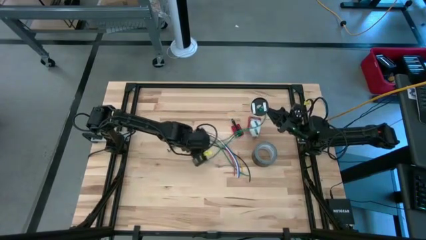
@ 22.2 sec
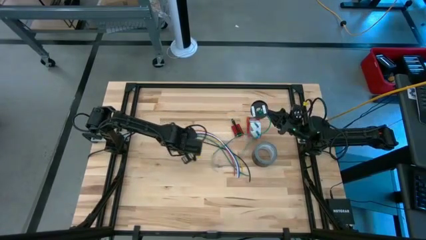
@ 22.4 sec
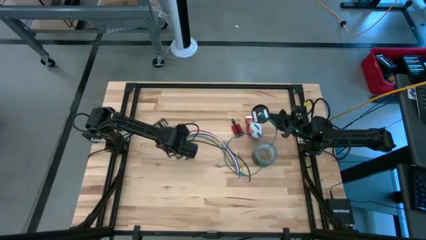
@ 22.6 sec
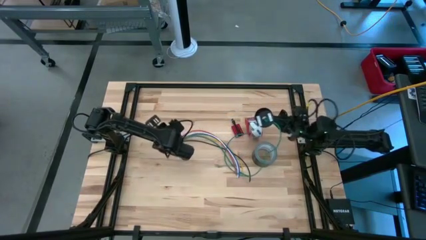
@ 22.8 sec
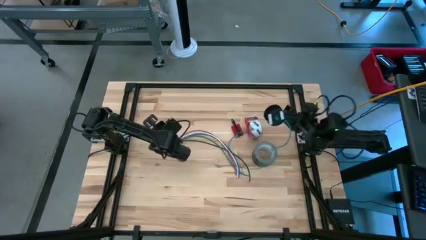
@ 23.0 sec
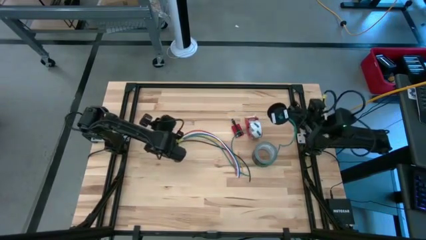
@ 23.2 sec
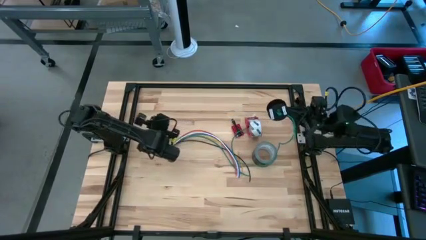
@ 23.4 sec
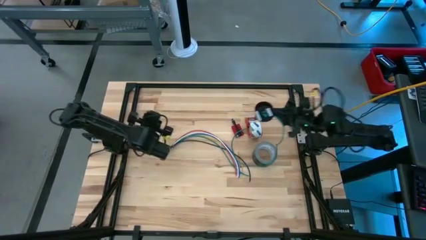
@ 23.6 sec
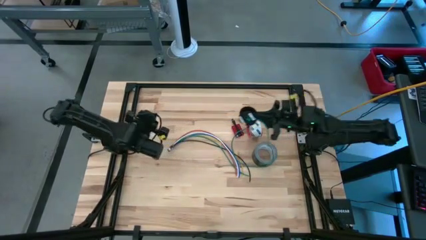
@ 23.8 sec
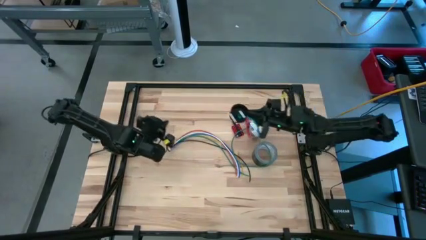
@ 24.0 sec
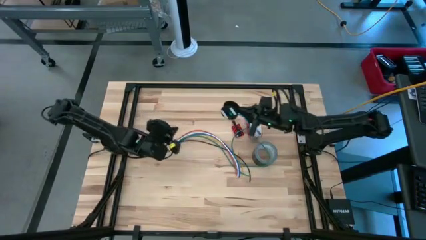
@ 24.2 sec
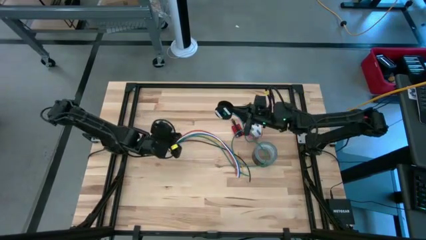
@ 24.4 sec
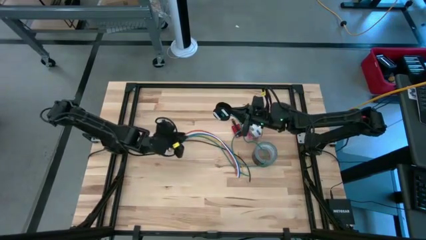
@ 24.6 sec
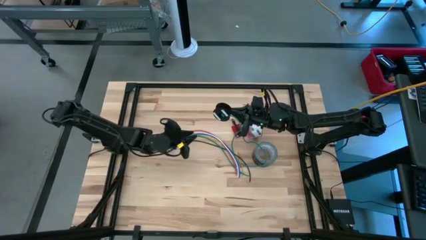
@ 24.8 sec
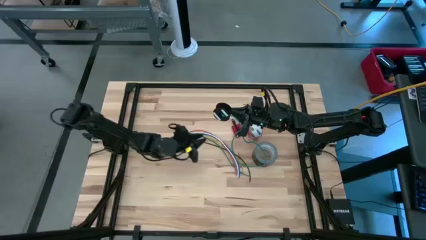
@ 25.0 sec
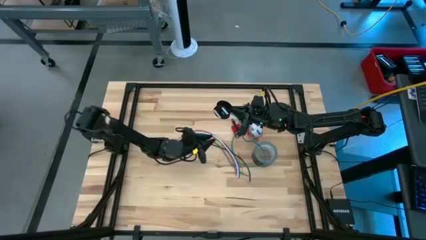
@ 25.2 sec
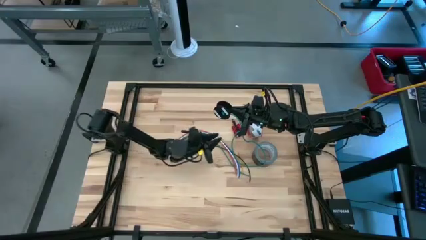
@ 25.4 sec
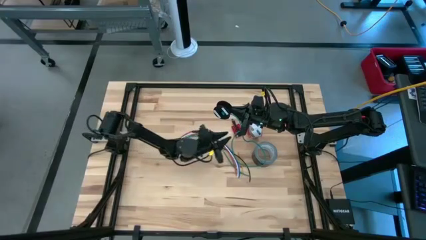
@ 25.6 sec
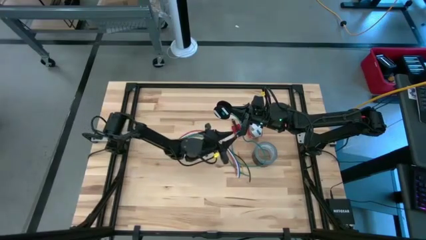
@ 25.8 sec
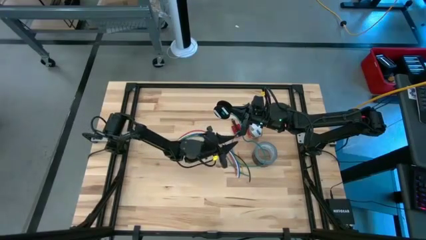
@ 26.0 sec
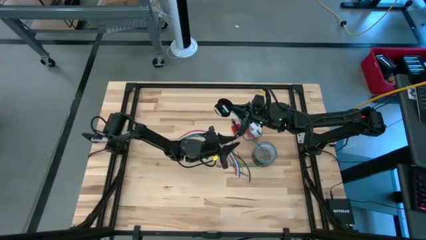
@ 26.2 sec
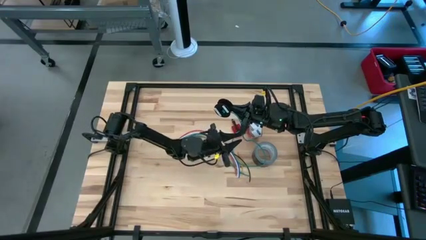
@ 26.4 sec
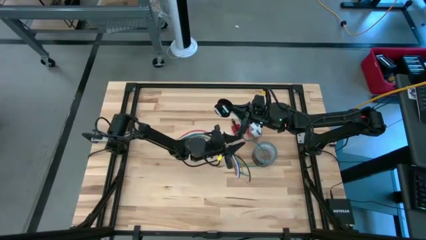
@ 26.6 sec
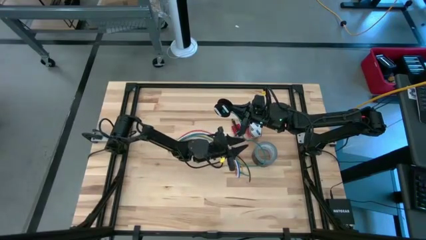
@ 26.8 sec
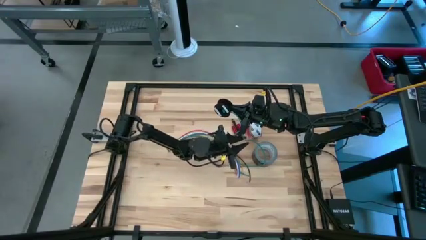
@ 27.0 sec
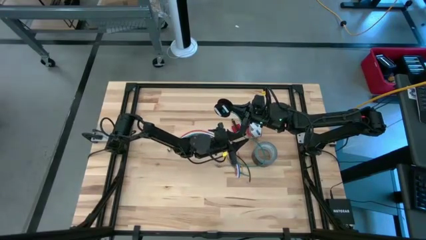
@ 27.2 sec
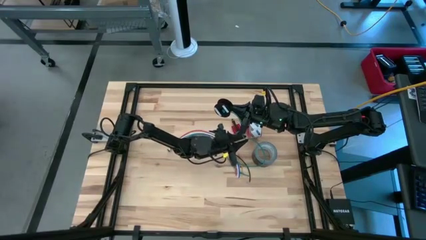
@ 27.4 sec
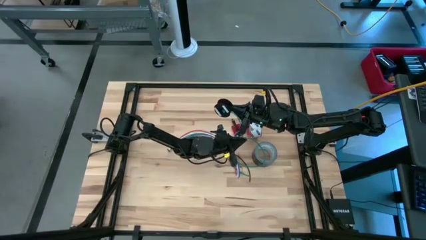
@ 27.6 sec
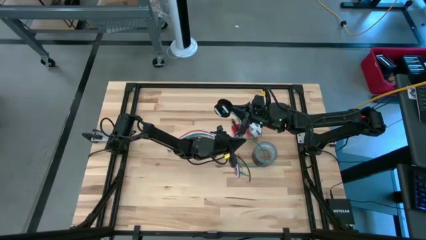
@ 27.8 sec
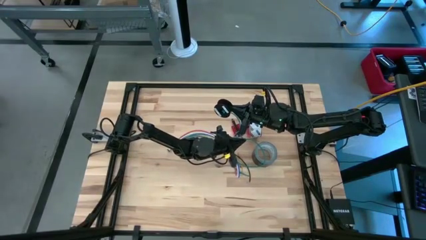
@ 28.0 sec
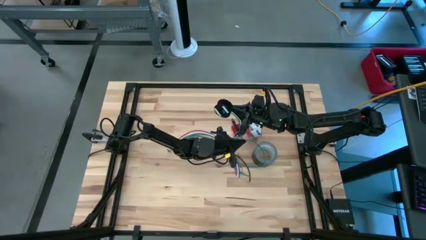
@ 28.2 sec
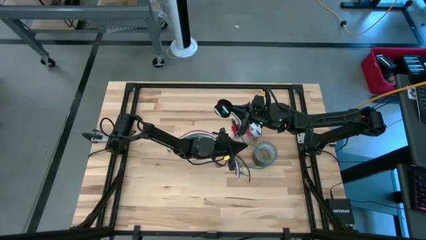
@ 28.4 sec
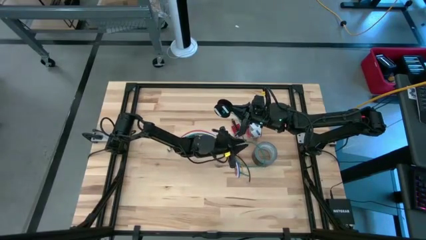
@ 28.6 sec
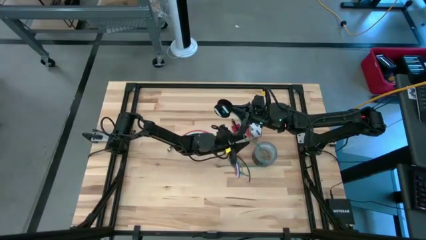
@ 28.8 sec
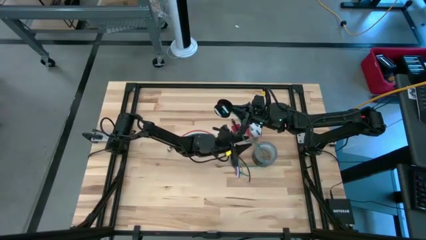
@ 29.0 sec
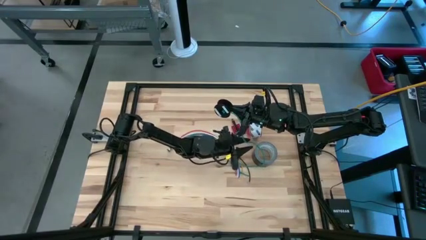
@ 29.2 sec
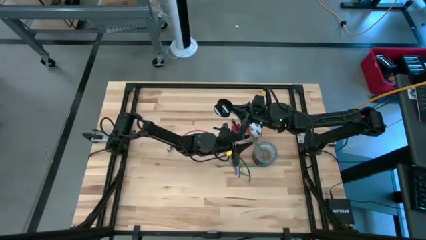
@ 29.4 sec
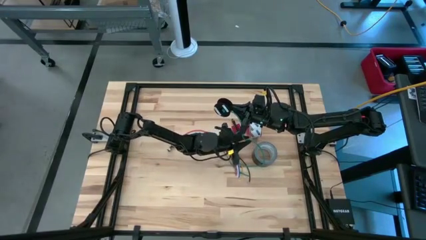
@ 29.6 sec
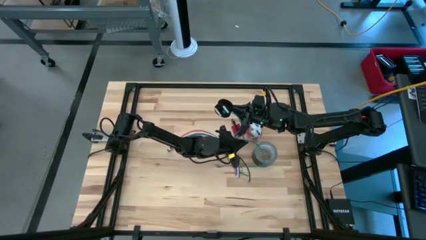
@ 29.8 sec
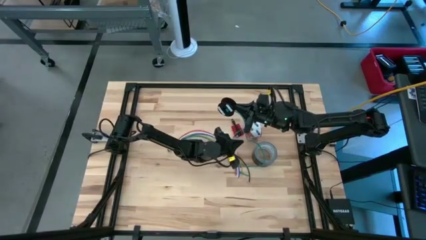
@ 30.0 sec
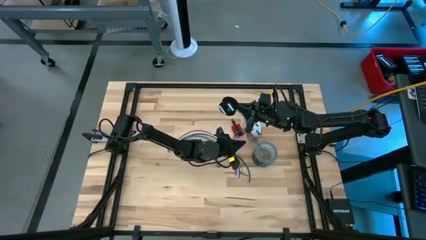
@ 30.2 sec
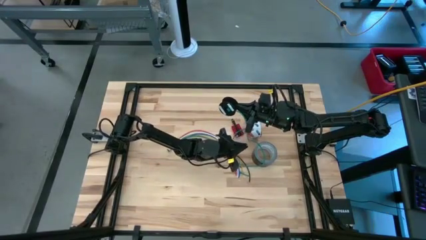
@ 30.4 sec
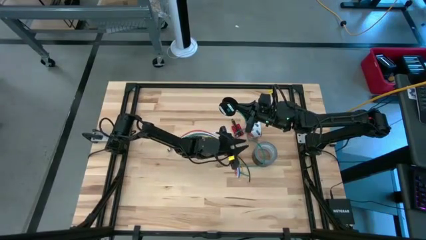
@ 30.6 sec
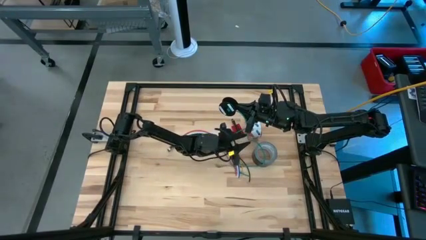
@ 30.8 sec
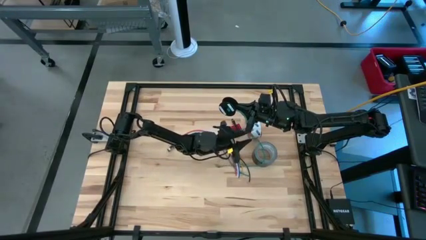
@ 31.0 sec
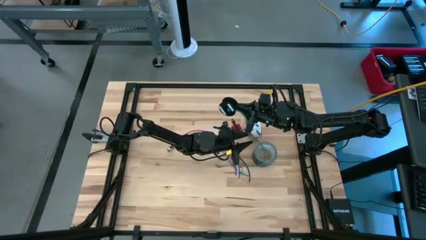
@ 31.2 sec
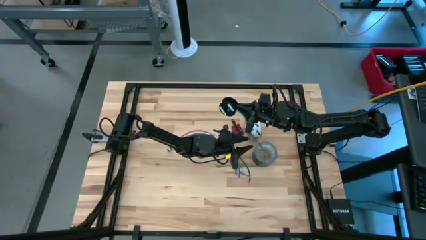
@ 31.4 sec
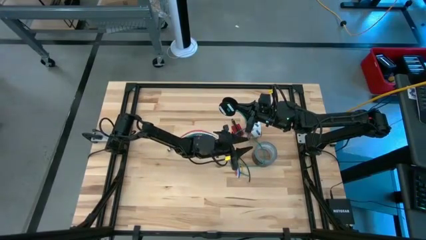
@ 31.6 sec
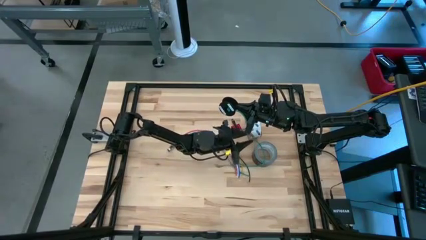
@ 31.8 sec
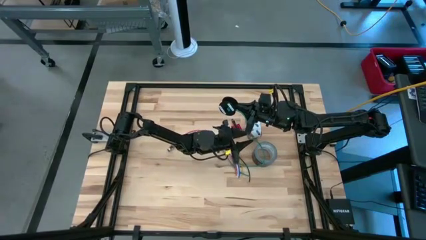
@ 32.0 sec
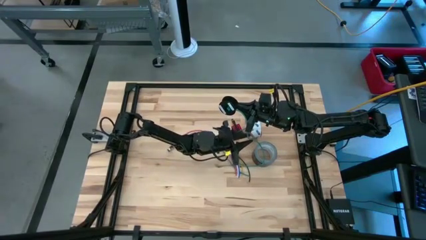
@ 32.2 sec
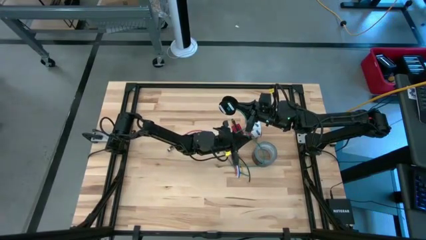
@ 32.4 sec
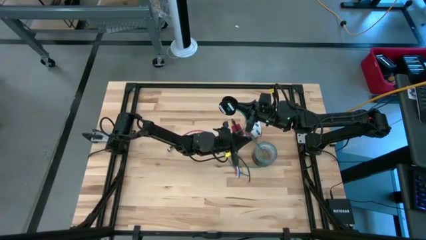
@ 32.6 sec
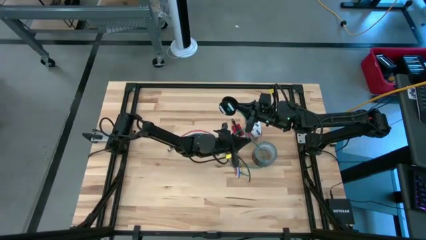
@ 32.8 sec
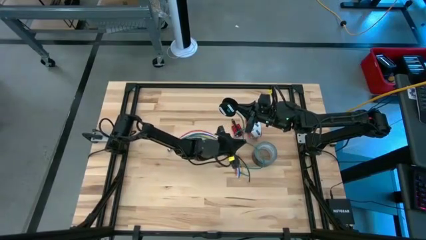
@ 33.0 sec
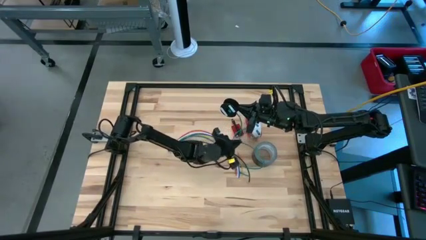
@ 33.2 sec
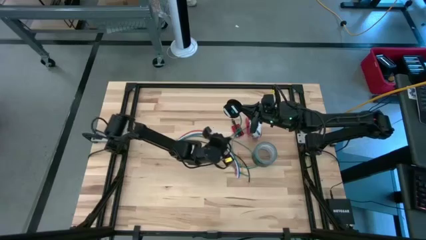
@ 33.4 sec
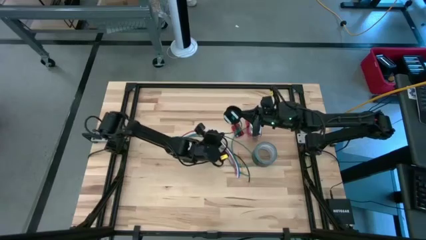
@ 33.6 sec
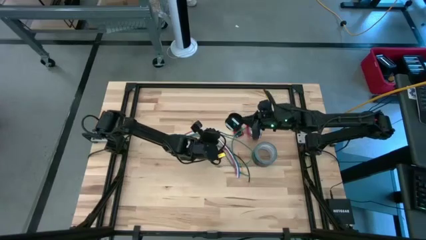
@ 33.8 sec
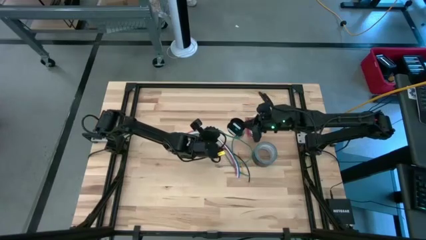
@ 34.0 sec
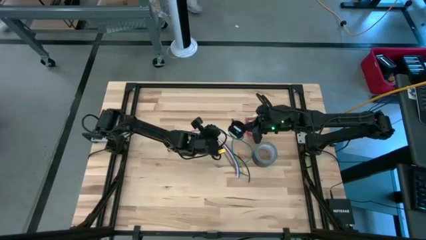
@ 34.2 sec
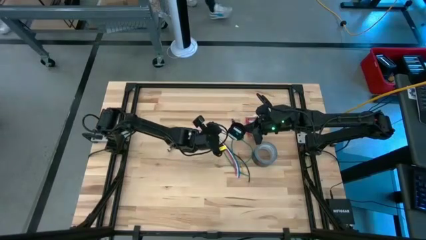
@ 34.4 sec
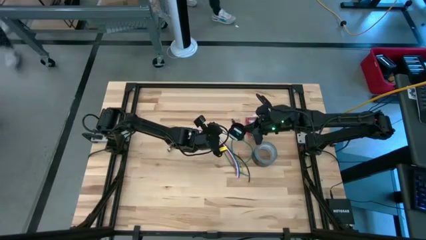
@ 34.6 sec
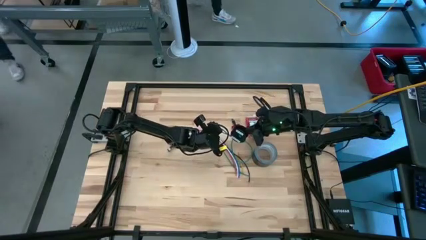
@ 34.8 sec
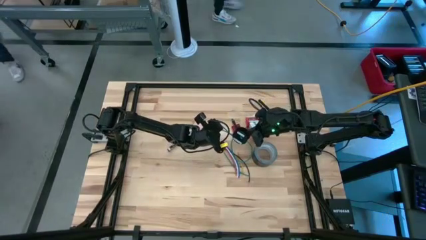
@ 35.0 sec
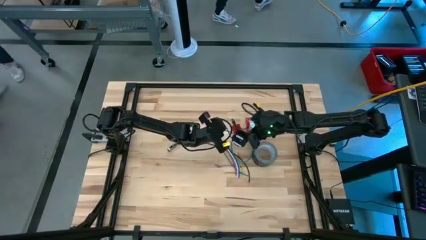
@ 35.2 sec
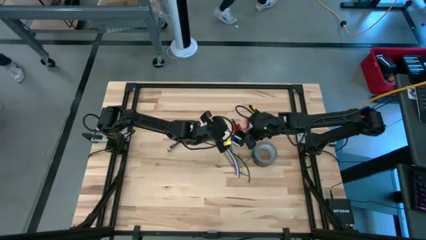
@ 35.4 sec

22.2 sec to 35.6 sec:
Task: Coil cords
Coil green wire onto the spool

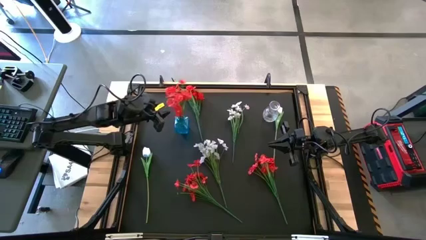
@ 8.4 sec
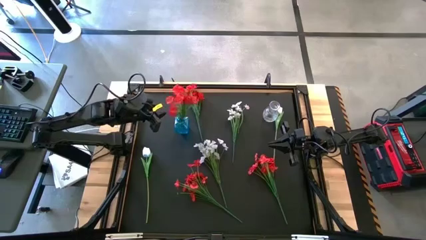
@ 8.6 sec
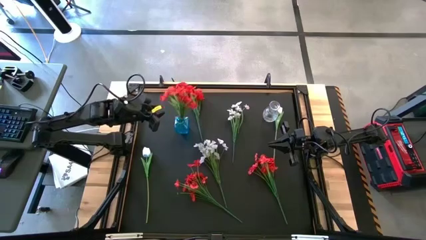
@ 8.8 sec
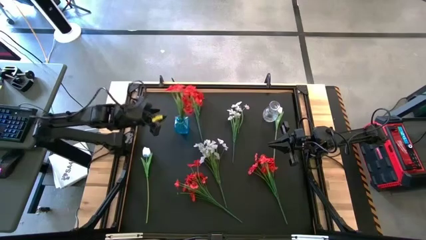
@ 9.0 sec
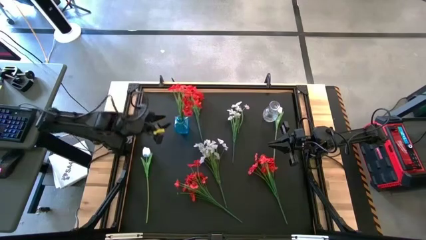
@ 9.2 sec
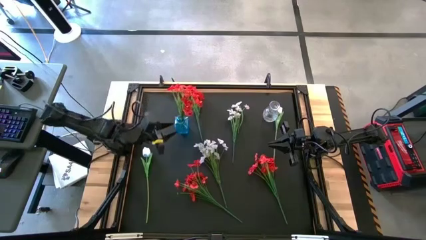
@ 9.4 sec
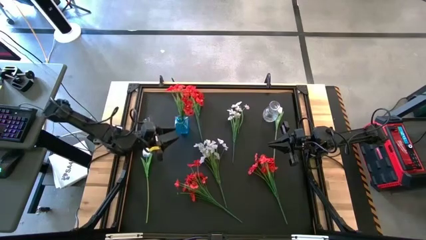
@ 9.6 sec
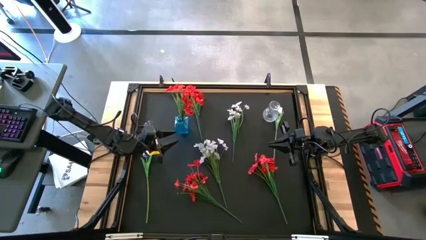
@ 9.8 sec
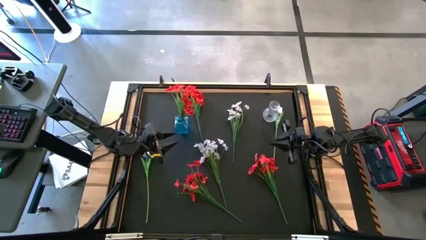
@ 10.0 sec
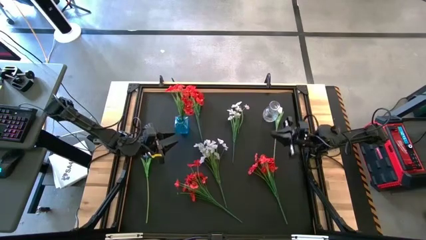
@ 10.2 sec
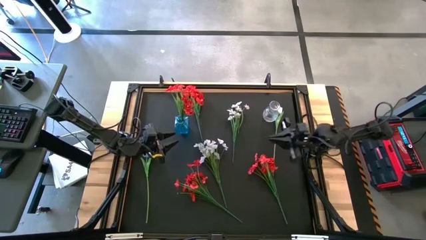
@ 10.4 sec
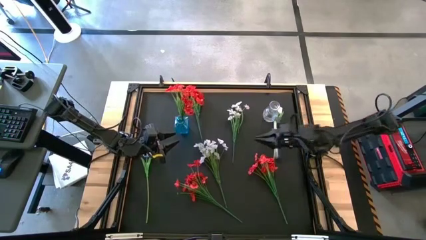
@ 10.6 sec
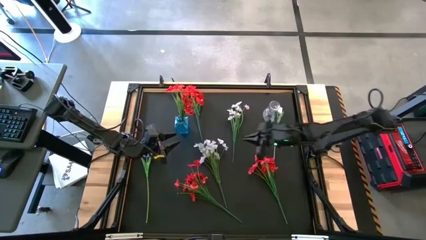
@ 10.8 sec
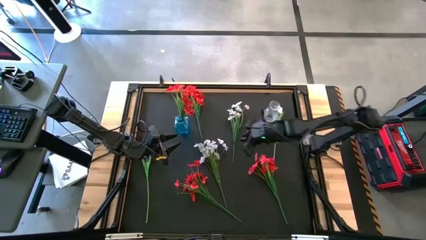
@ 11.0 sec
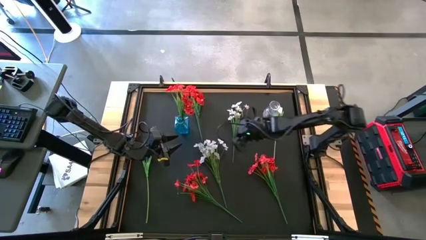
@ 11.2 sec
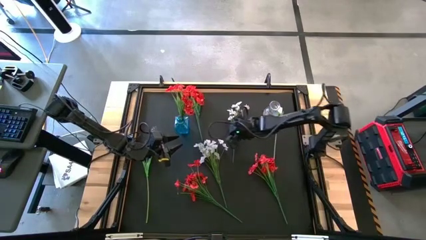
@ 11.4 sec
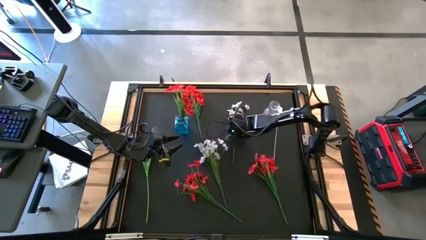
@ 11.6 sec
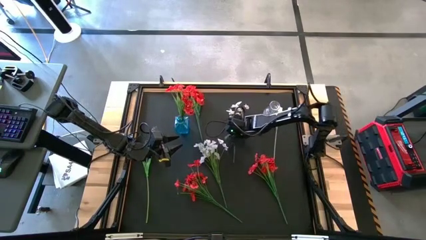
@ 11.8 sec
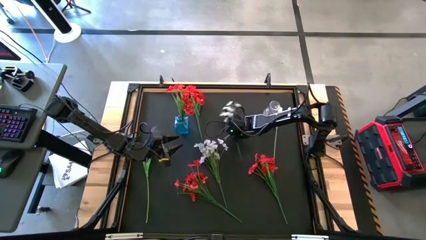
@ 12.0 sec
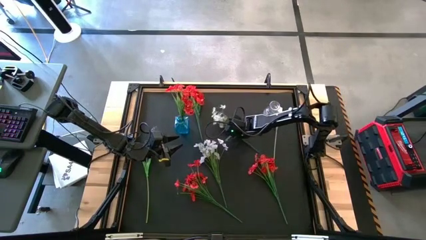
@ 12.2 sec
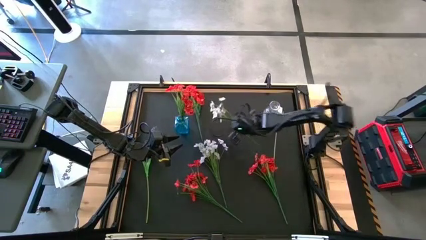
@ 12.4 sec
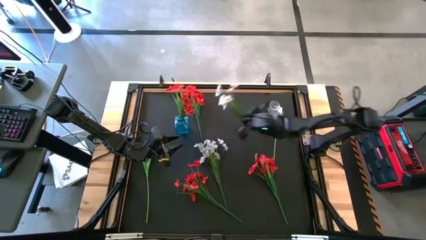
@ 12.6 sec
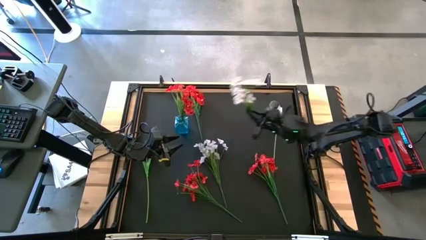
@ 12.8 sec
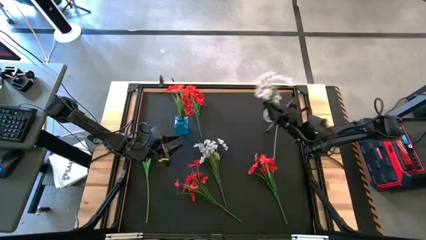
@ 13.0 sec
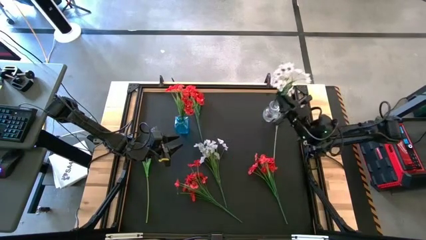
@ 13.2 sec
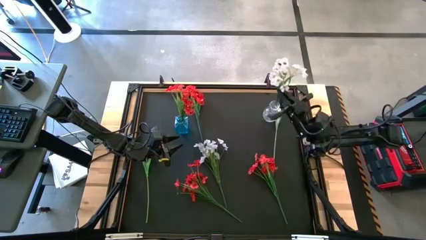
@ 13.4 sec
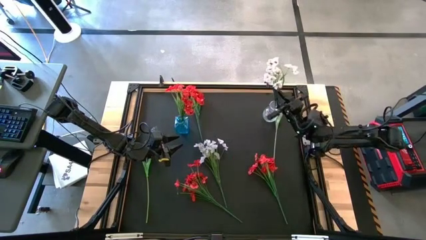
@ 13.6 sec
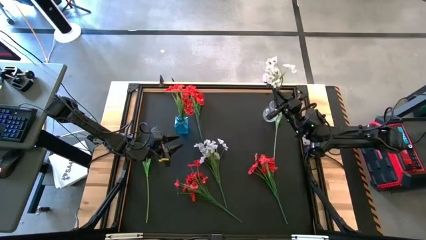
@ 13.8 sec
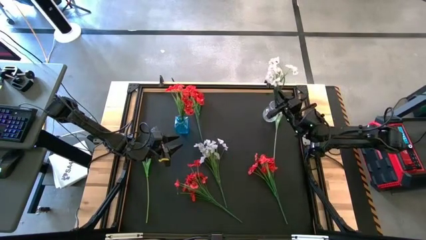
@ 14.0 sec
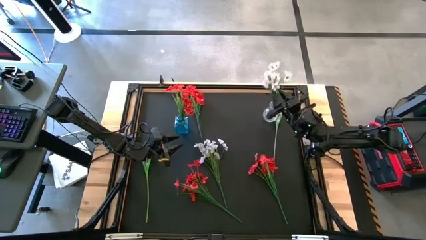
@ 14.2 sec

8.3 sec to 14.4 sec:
Task: Sort flowers into vase by color
Put the top white flowers into the transparent vase
